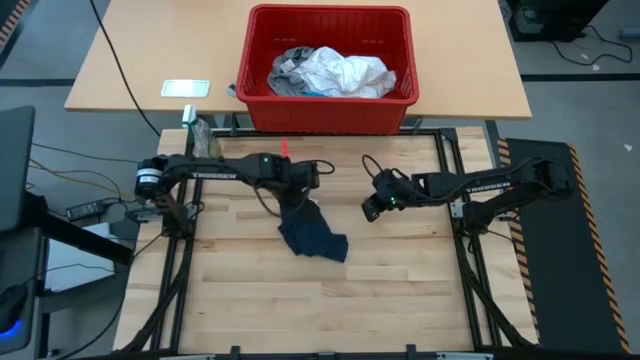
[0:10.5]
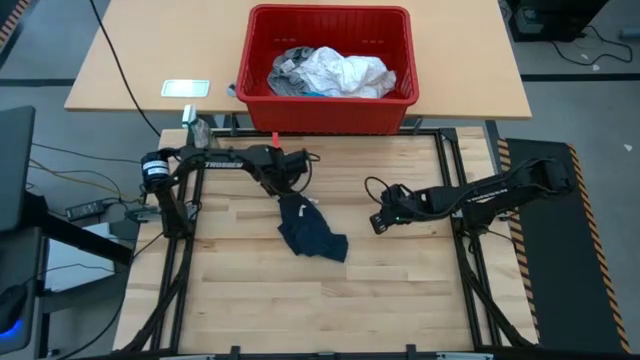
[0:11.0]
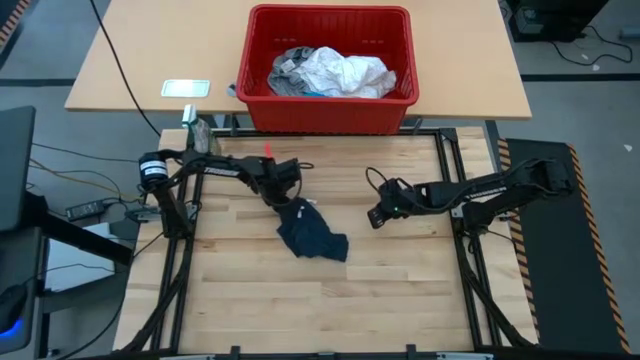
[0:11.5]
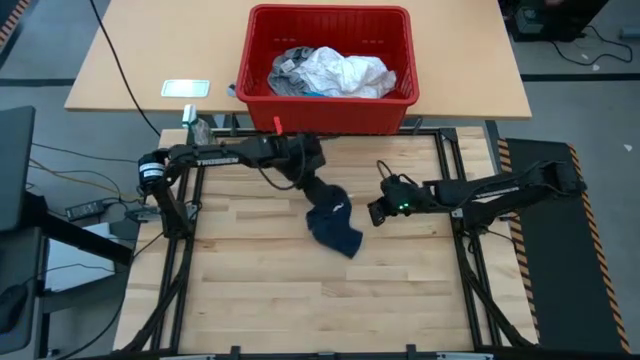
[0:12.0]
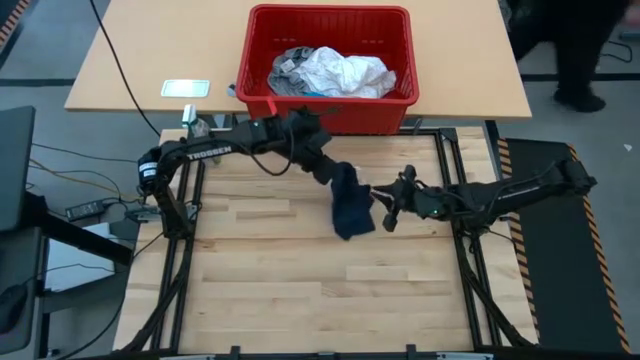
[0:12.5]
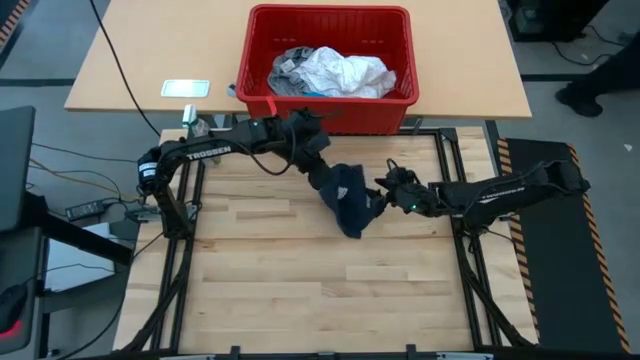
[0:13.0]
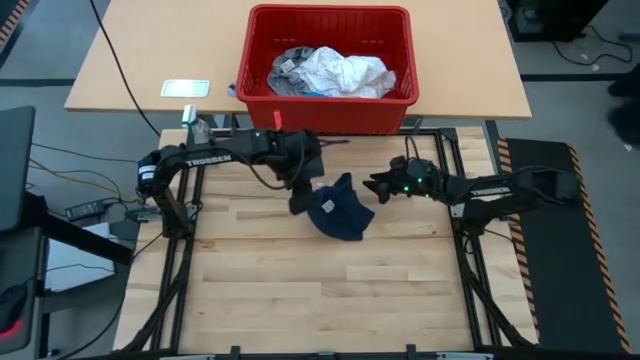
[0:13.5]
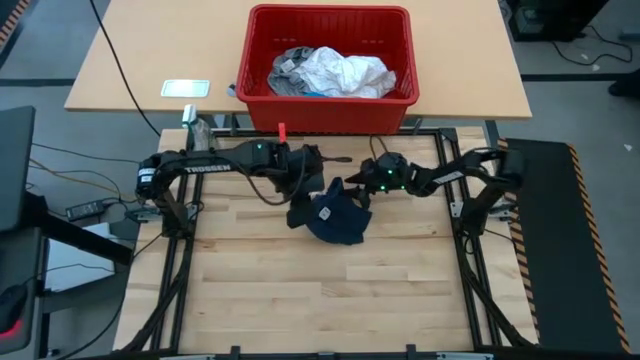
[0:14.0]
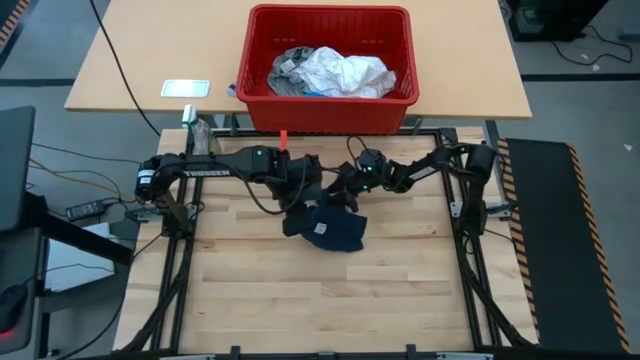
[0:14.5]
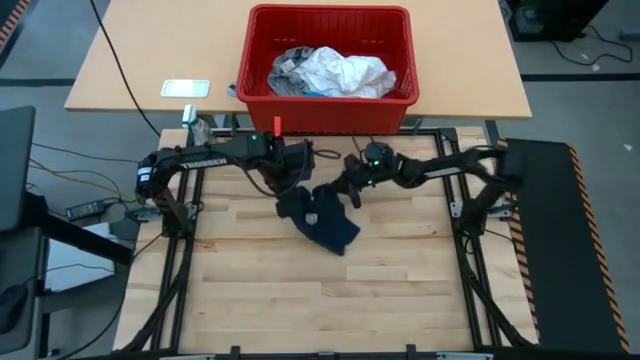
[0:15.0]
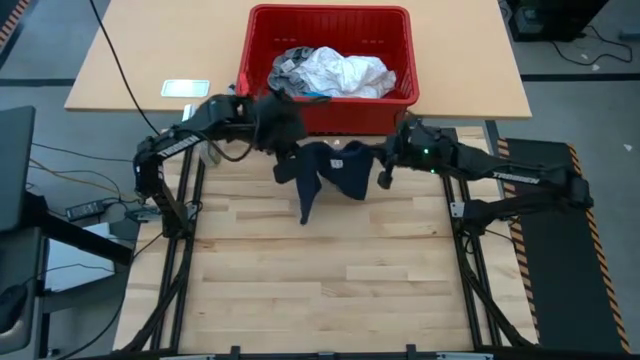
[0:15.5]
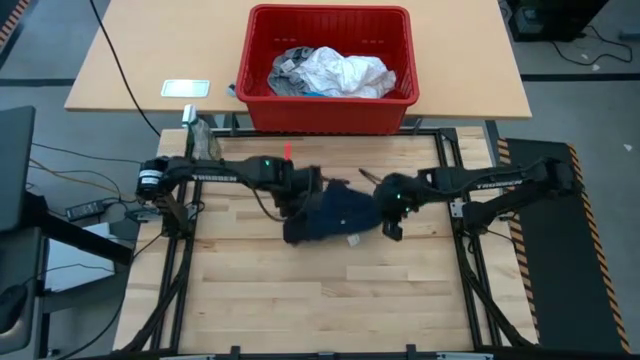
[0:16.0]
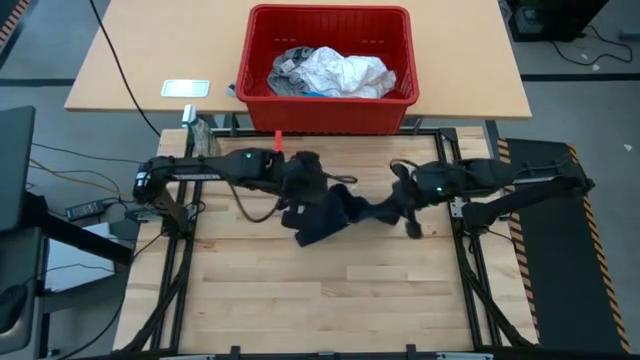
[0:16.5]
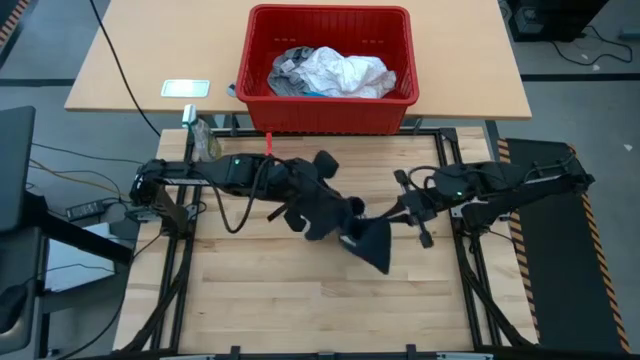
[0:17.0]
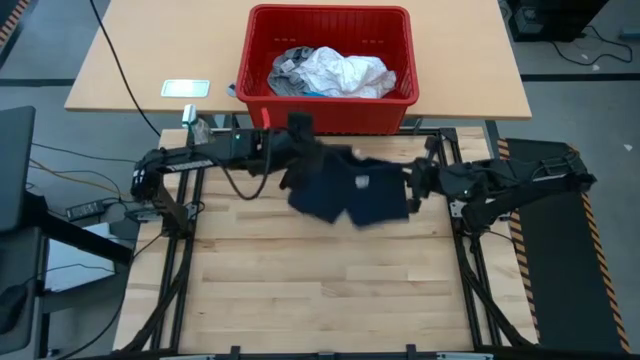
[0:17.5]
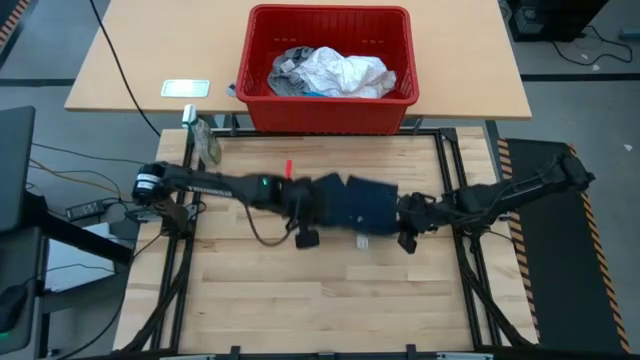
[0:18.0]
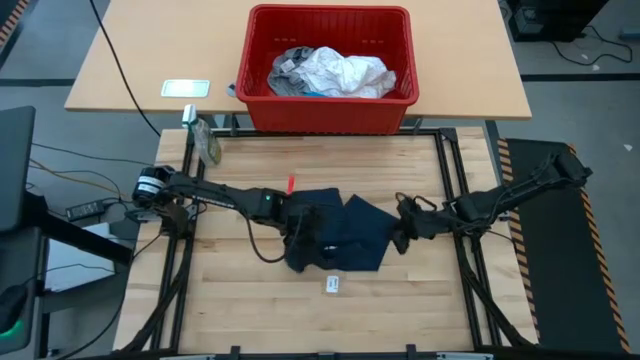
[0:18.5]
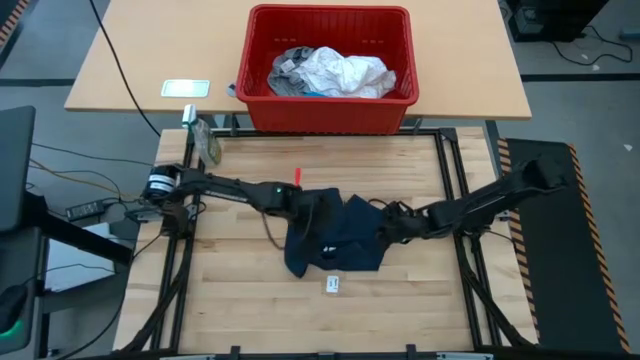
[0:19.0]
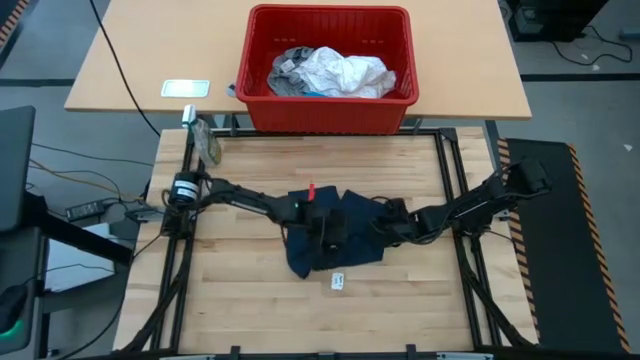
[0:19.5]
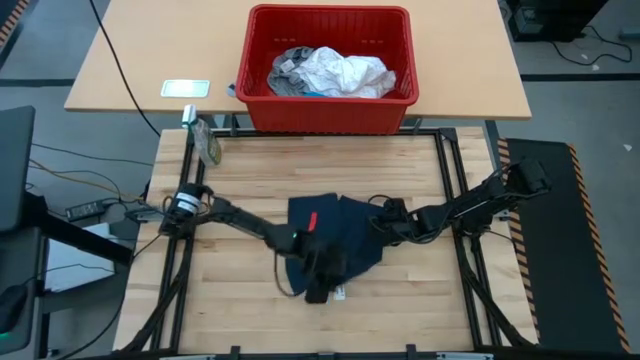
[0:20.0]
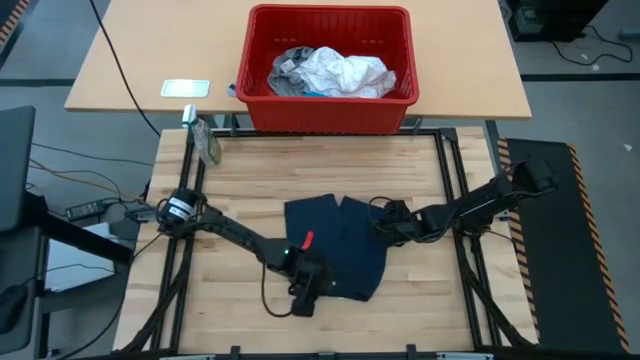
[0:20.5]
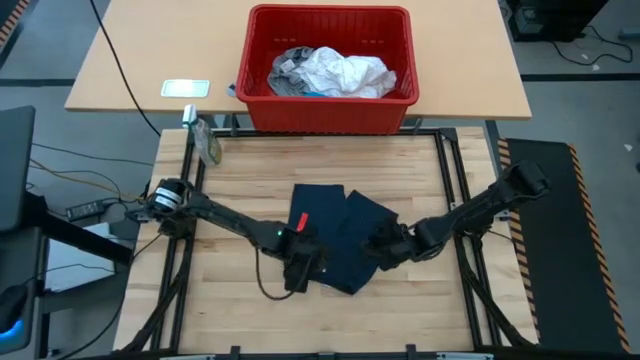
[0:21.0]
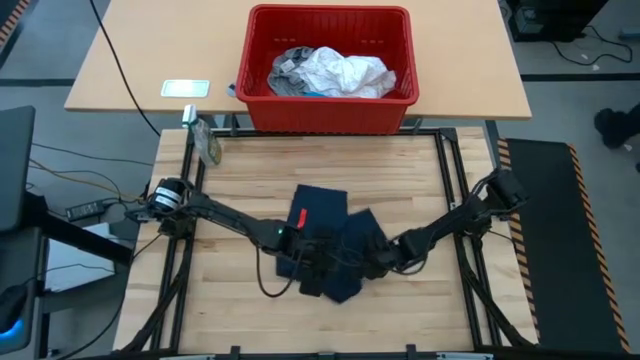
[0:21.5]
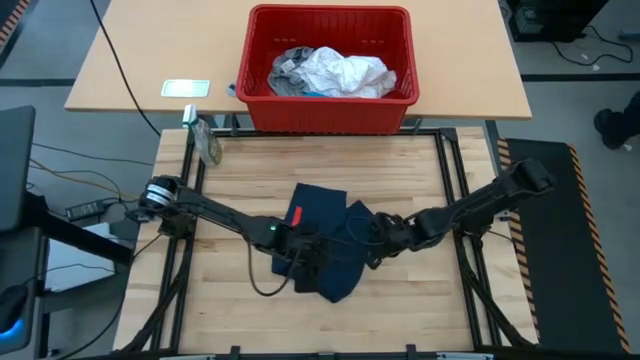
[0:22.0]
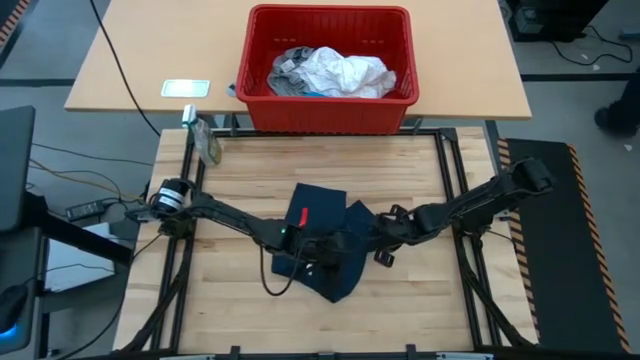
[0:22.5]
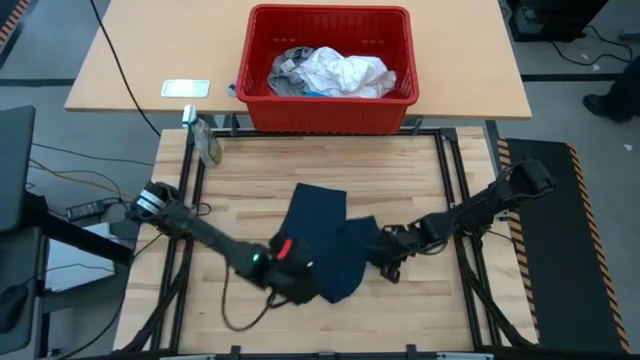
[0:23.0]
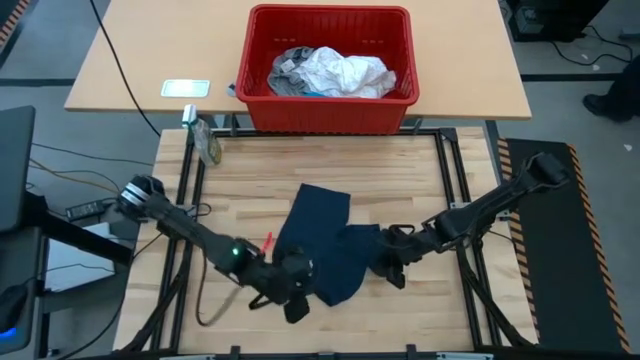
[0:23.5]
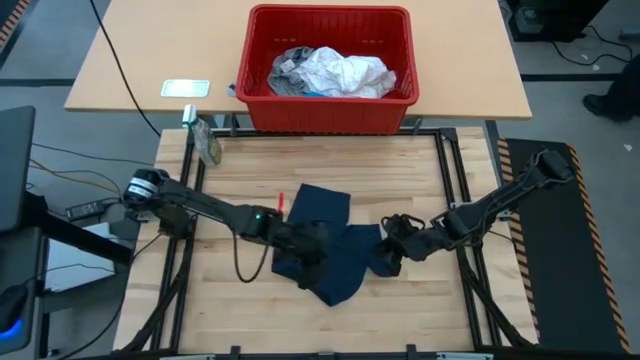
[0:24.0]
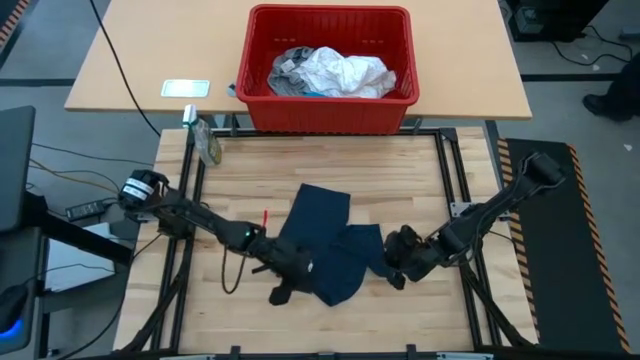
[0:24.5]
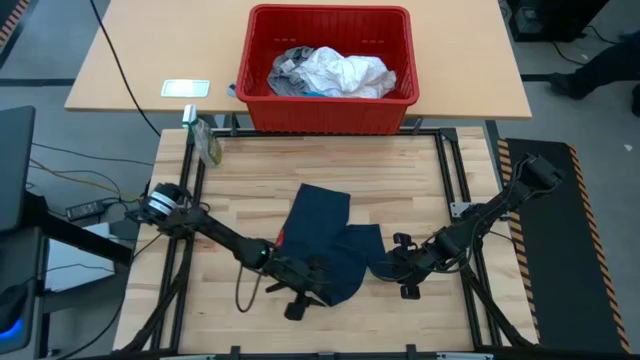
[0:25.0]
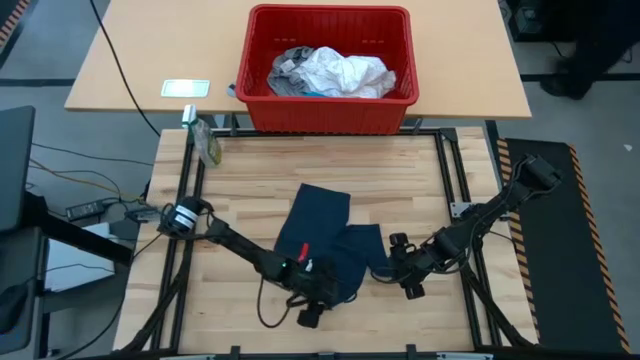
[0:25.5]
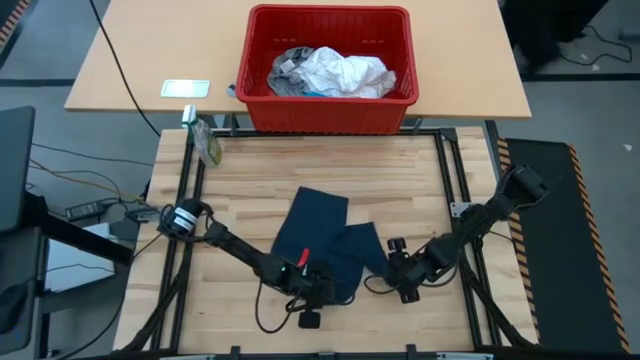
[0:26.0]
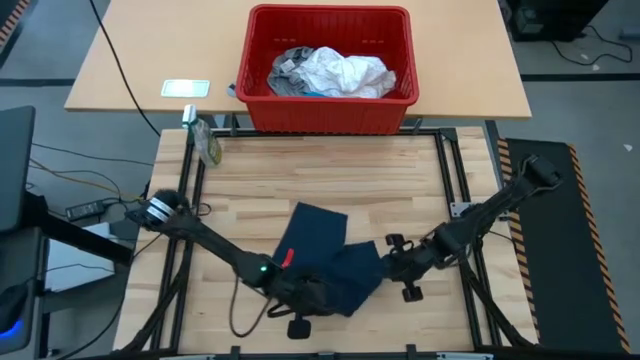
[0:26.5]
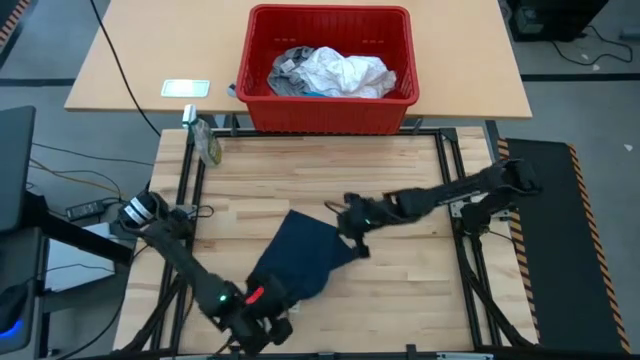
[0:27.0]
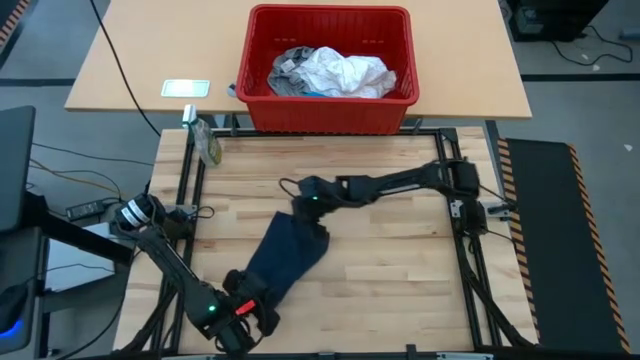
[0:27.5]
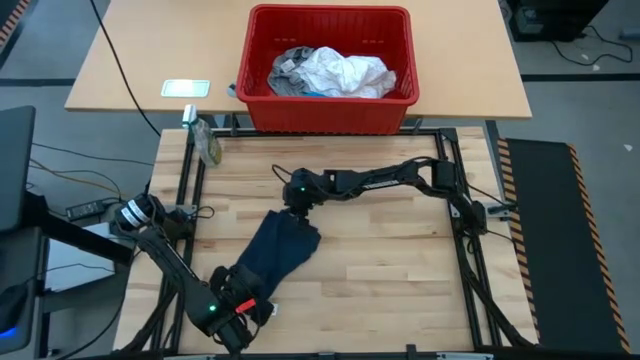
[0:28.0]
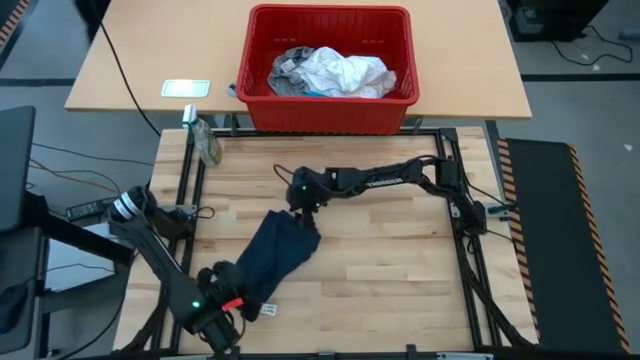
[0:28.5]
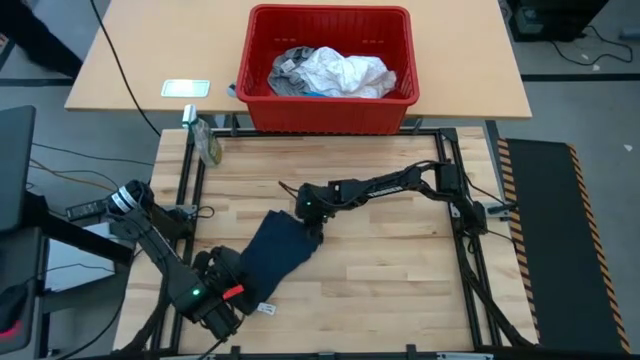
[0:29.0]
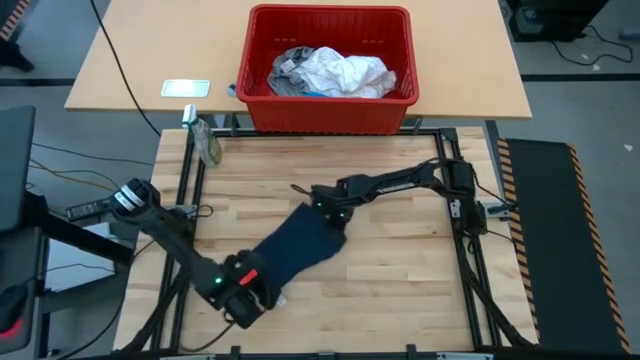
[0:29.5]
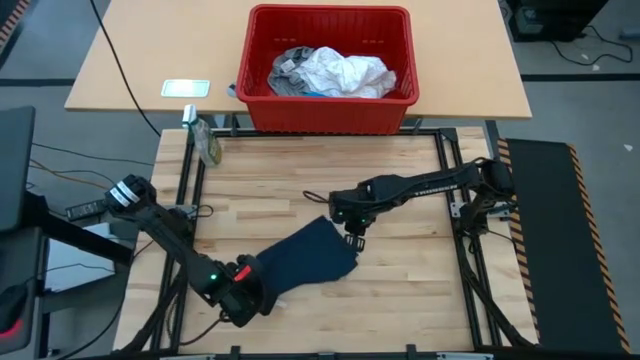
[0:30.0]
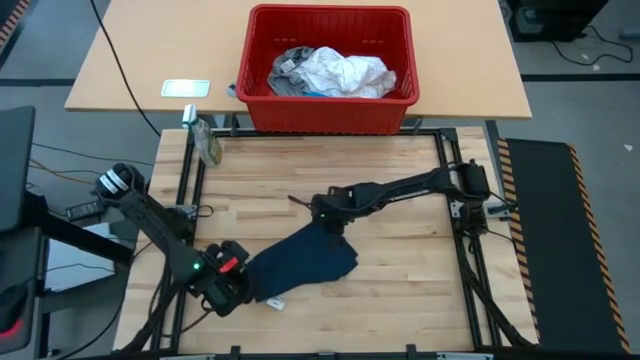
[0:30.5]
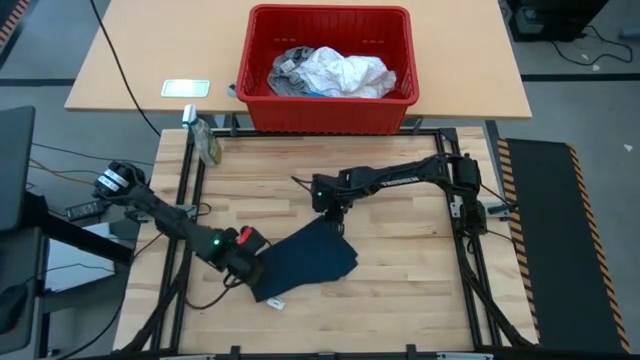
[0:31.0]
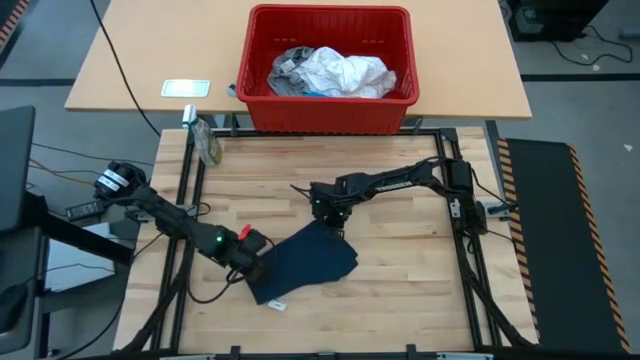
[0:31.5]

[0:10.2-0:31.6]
Task: Fold laundry
Fold the blue shorts
